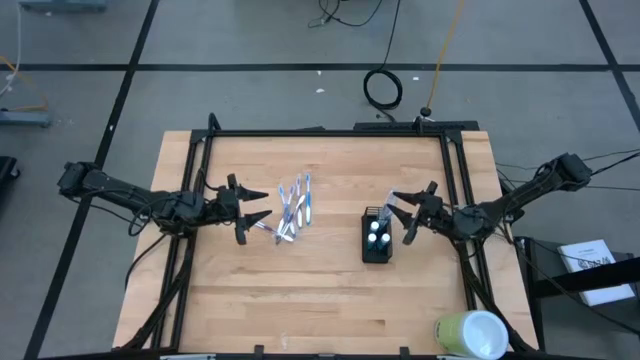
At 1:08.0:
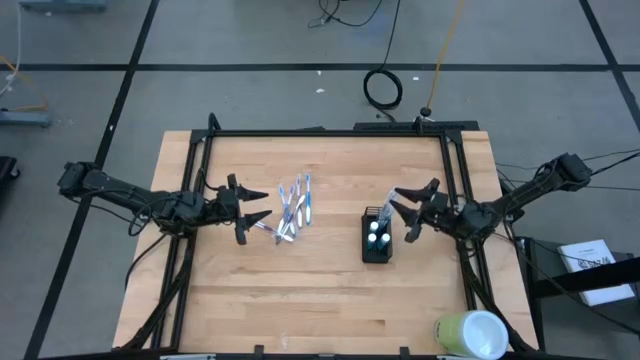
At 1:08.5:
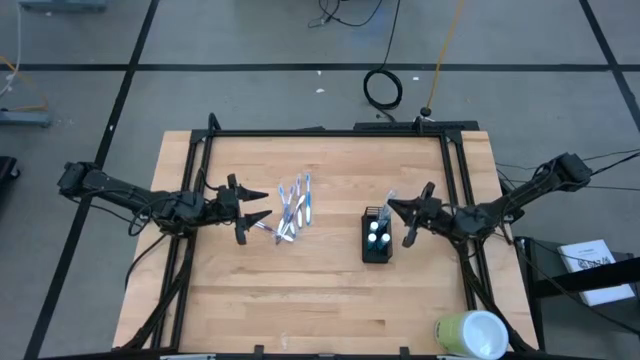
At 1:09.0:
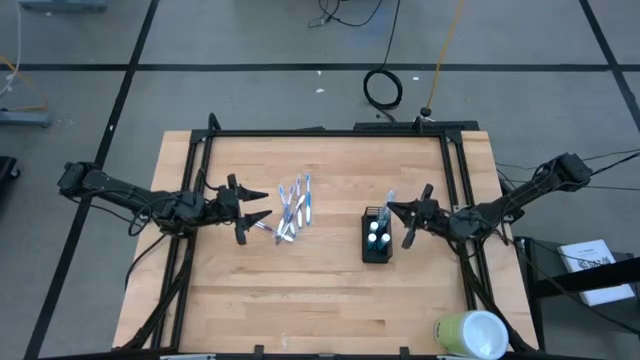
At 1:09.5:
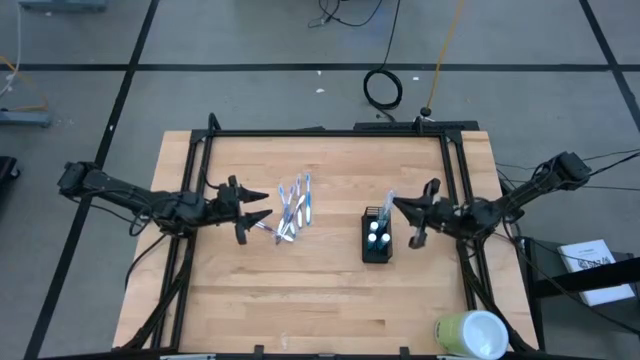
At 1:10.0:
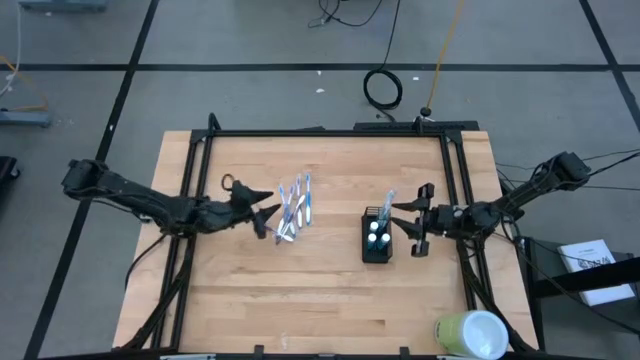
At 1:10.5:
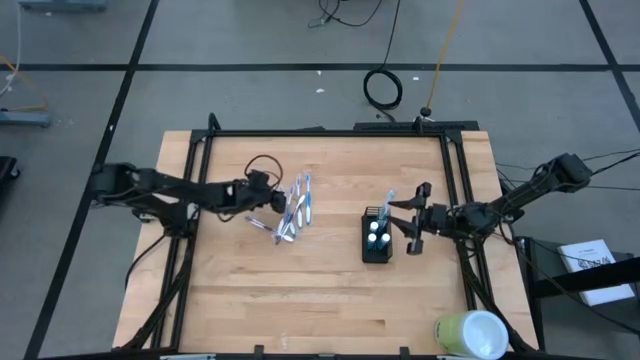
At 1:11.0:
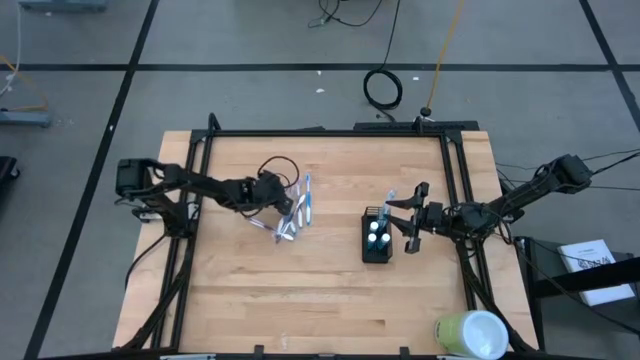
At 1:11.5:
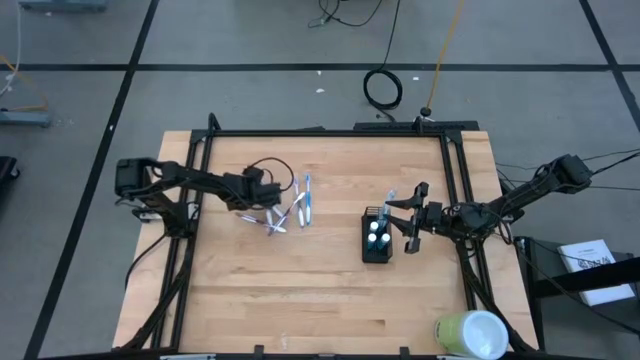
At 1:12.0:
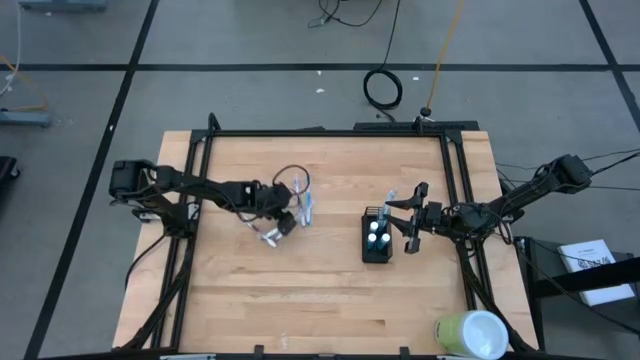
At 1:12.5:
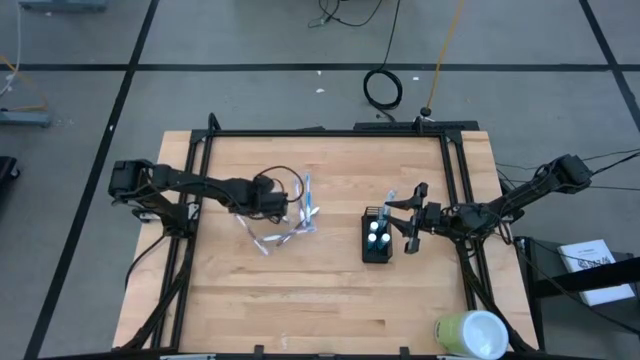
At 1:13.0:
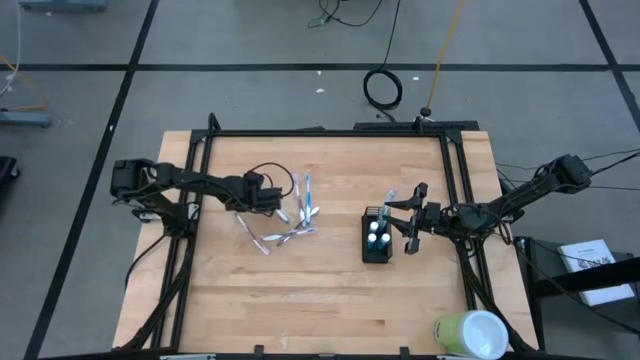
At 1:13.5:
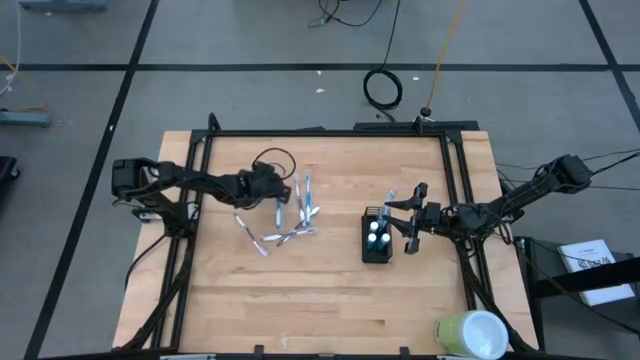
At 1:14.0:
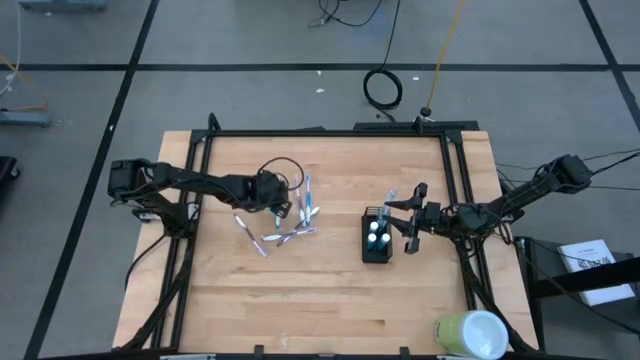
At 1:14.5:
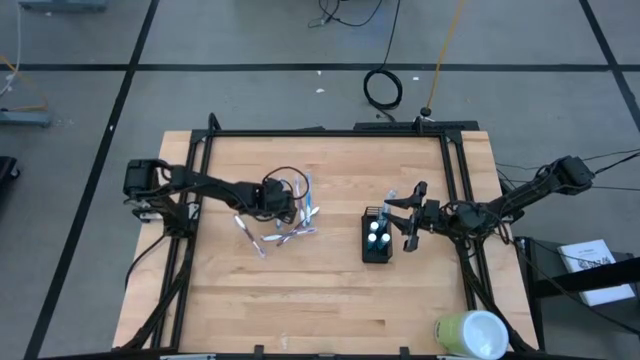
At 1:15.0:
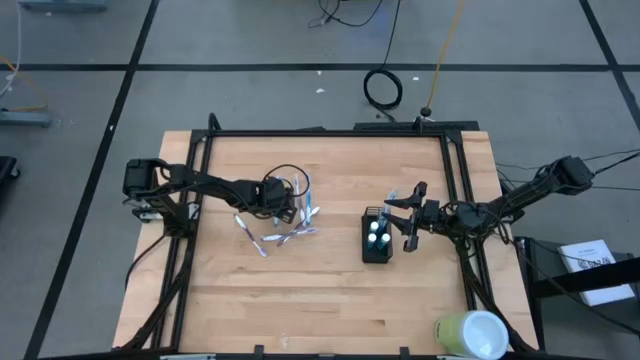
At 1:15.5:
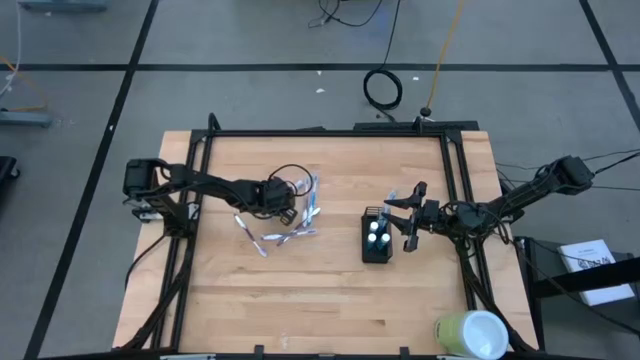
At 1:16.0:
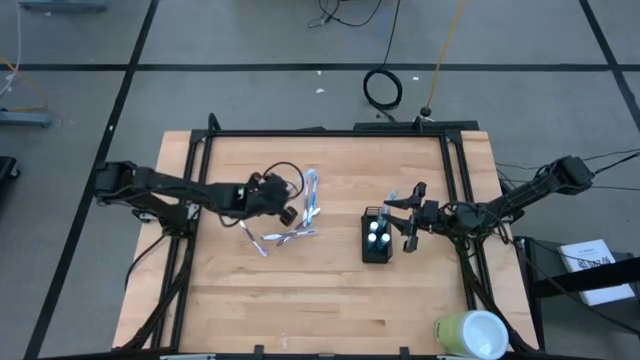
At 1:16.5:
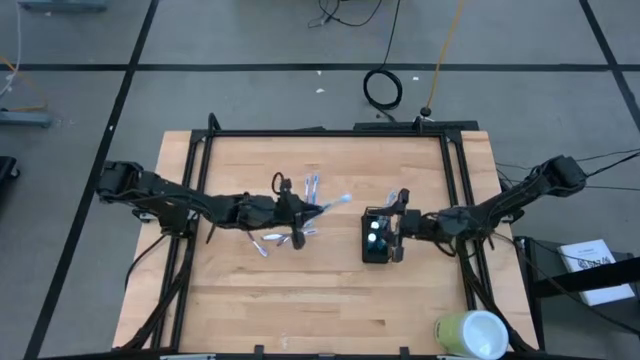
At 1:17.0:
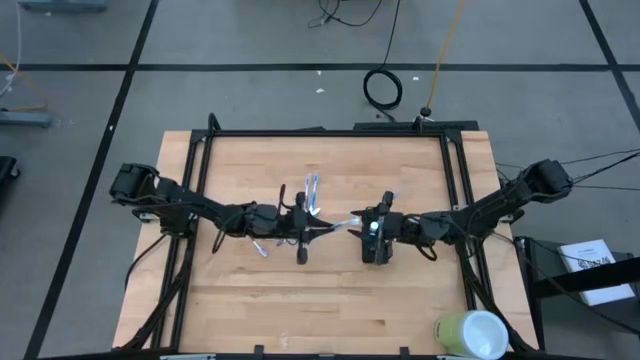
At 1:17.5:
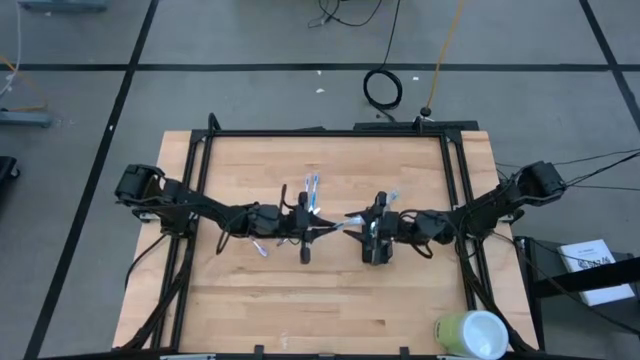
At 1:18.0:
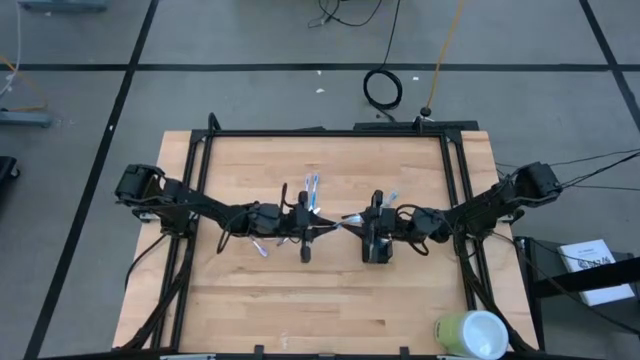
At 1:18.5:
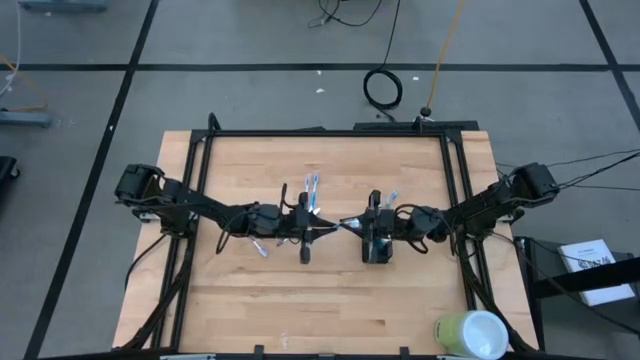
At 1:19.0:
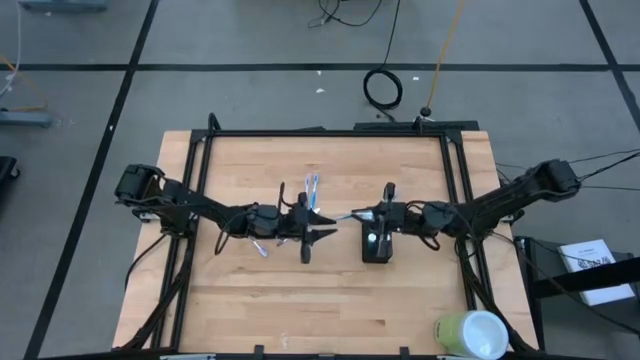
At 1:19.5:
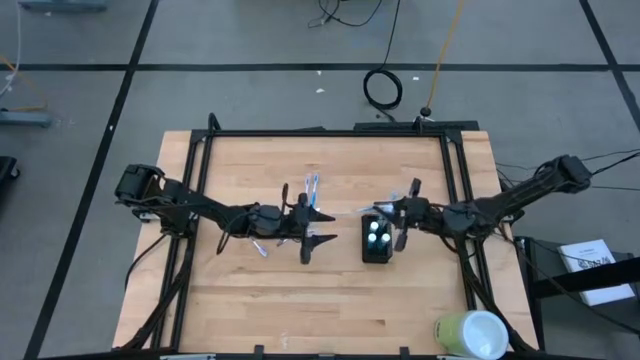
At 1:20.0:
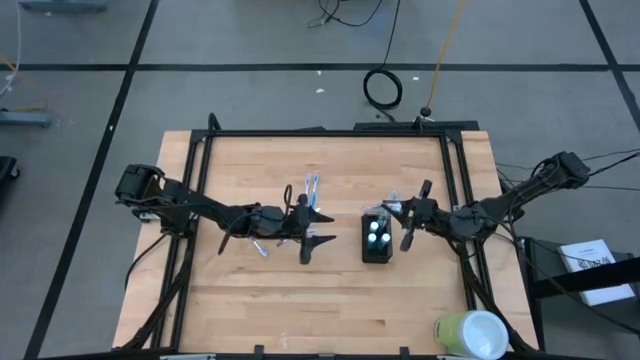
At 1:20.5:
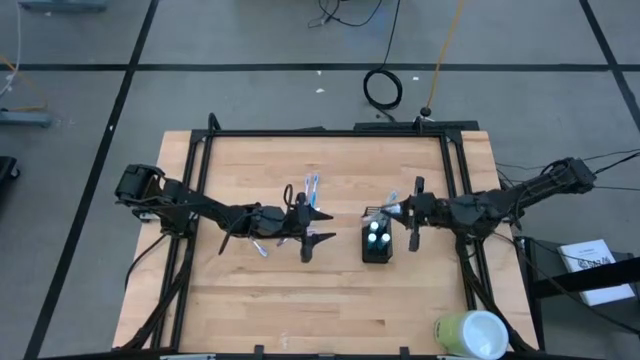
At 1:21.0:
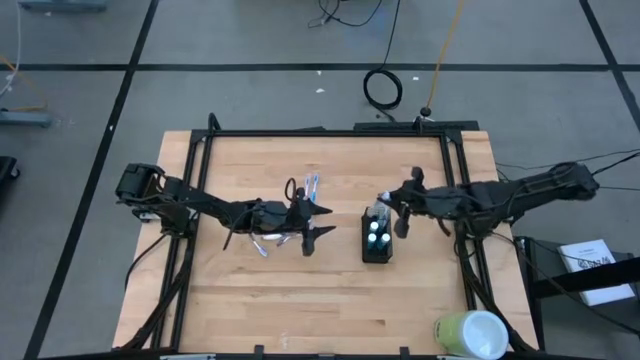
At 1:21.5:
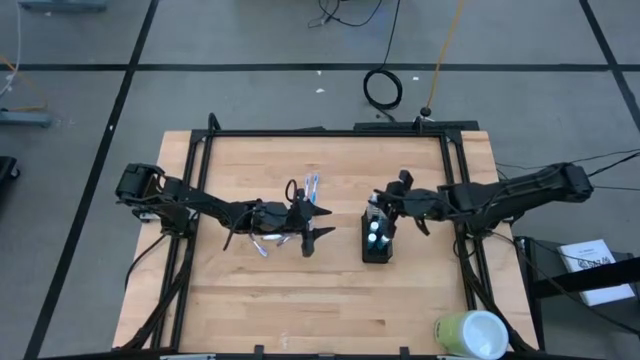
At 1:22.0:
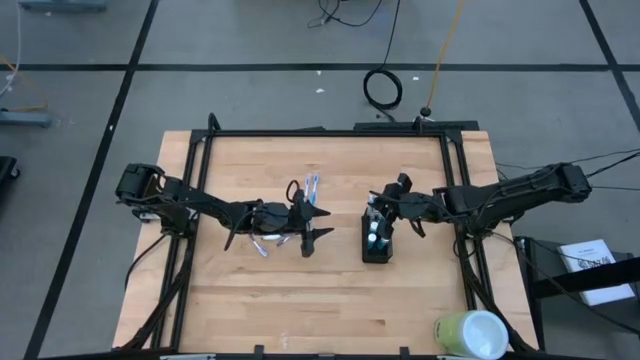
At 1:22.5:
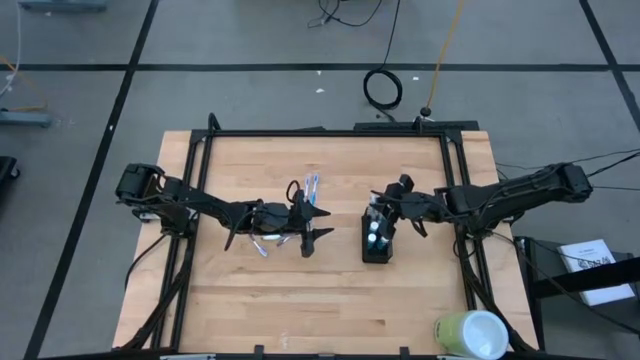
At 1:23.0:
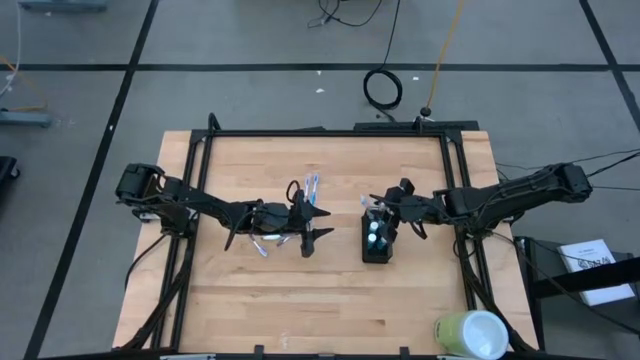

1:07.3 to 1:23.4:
Task: Pick & Place toothbrushing station
Put the blue toothbrush into the black organizer

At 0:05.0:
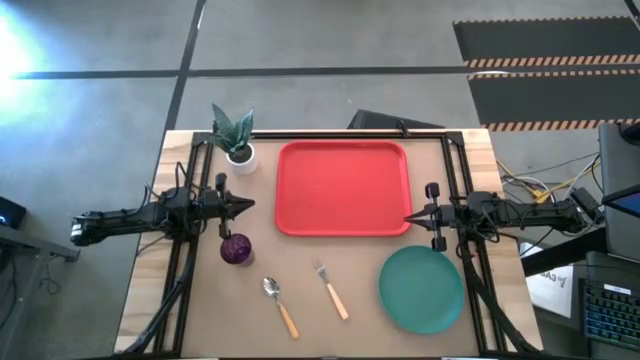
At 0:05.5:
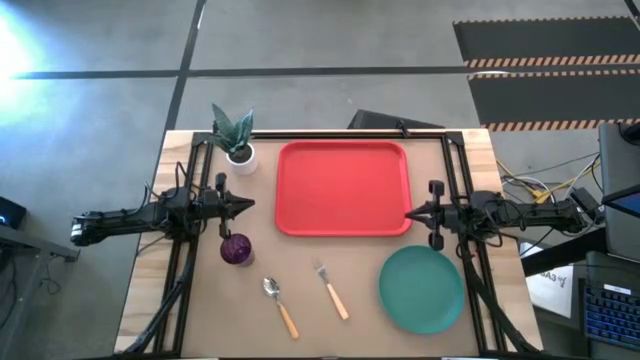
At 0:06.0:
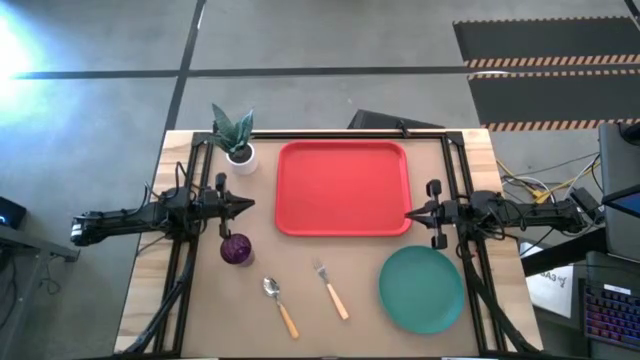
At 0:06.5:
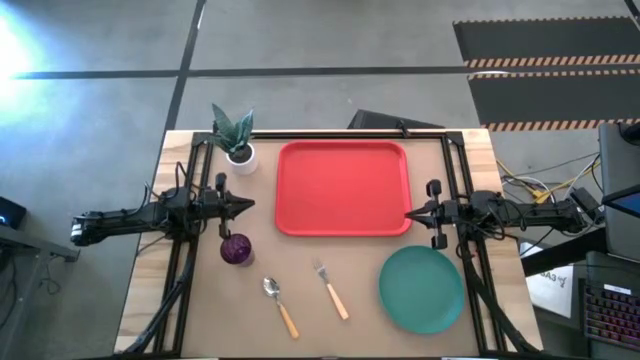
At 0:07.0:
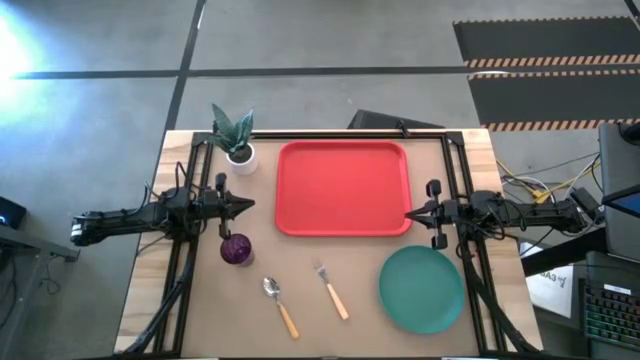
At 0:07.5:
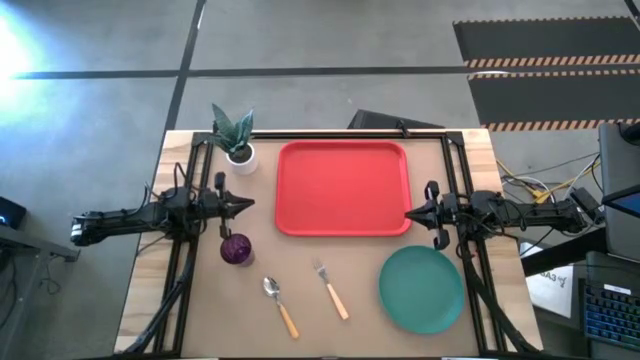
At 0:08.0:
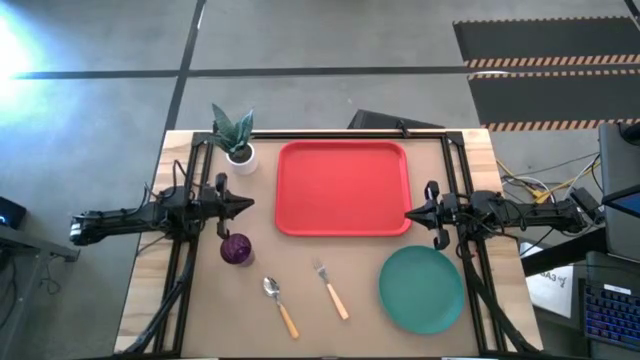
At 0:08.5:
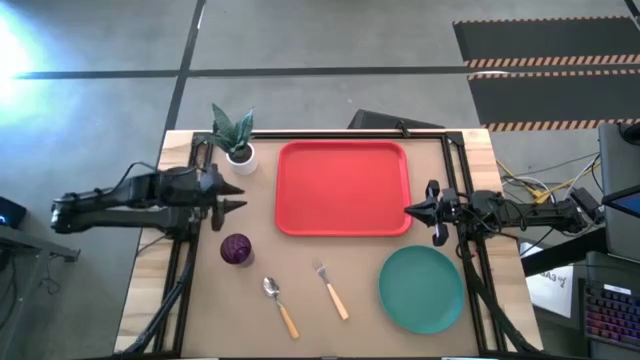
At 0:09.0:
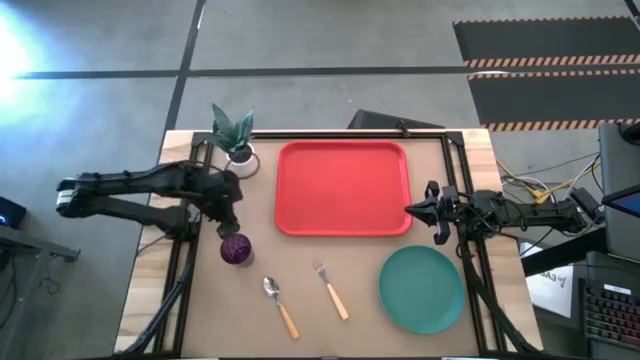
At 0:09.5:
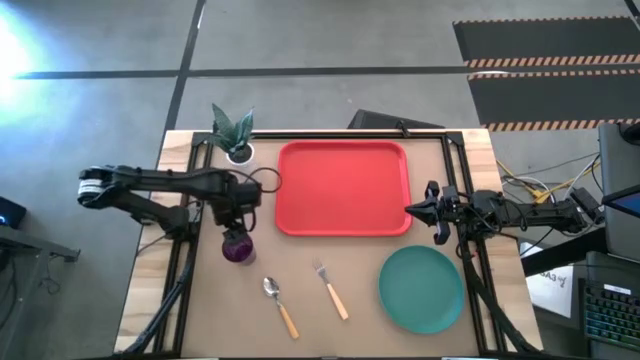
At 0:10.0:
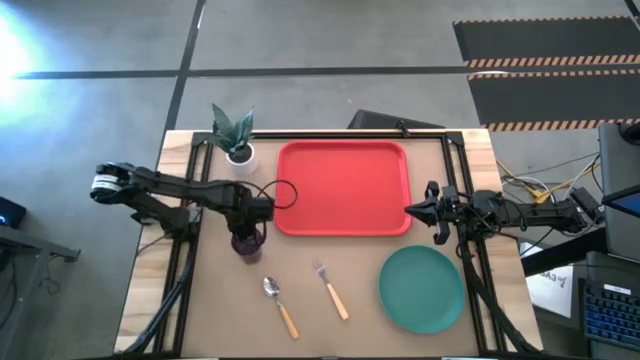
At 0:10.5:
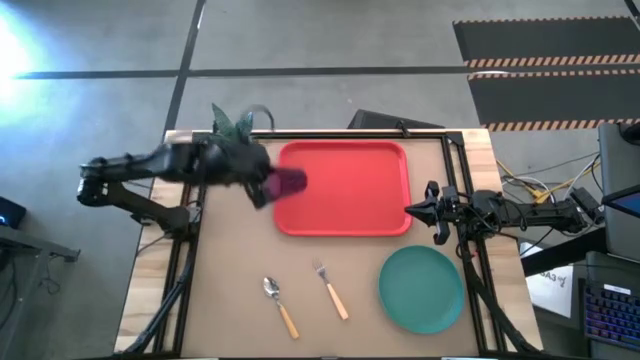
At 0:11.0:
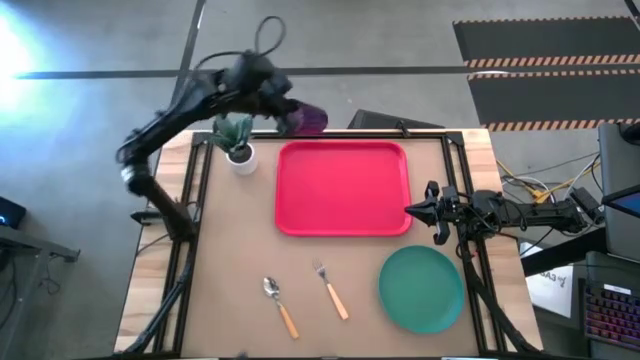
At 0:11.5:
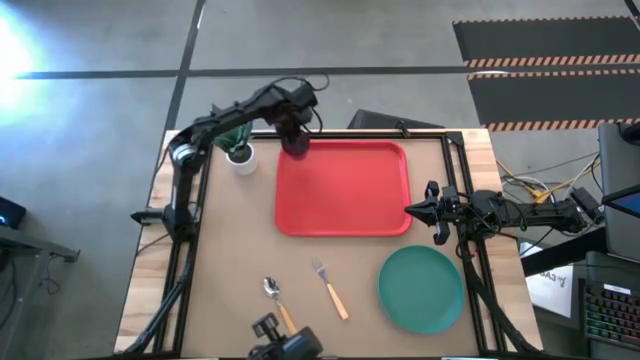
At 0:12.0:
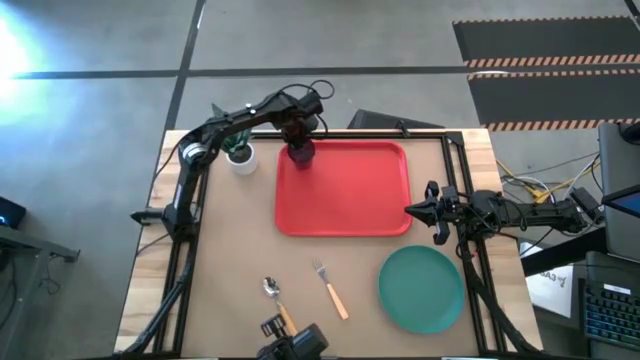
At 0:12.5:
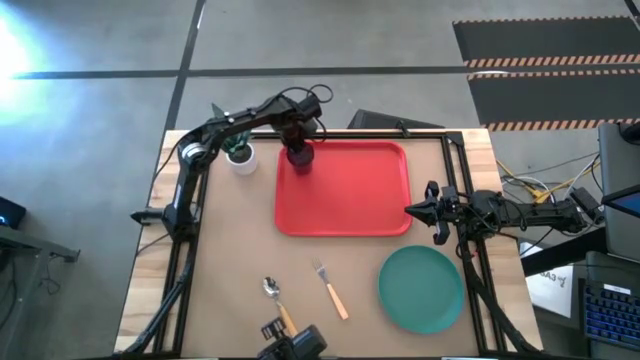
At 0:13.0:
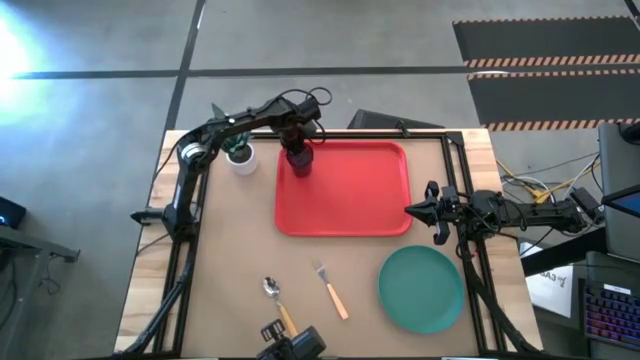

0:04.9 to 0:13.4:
Task: Pick and place plate/cup/fork/spoon on tray
Put the violet glass cup on the red tray
